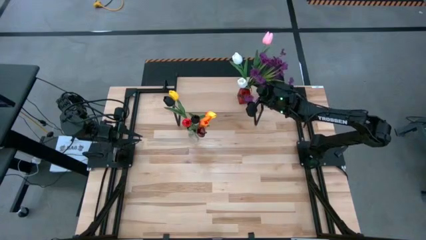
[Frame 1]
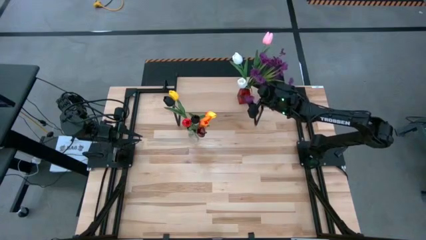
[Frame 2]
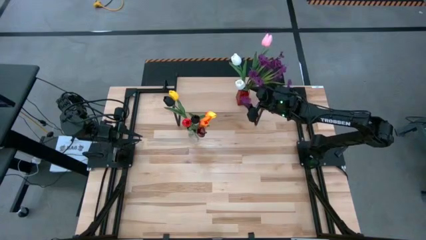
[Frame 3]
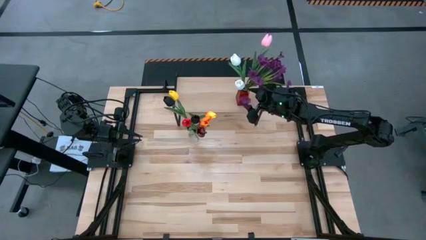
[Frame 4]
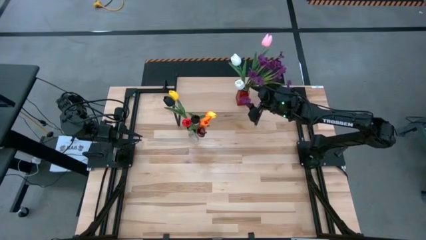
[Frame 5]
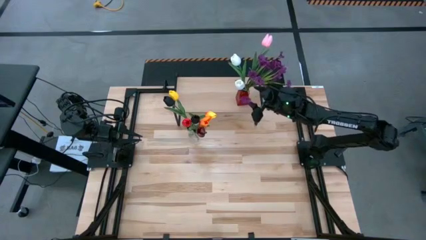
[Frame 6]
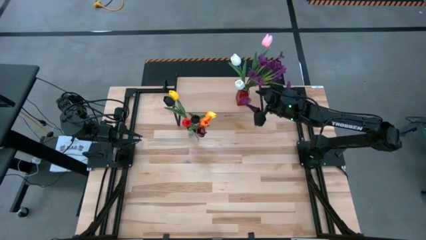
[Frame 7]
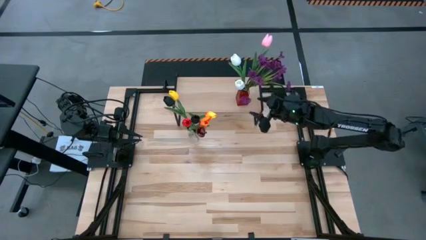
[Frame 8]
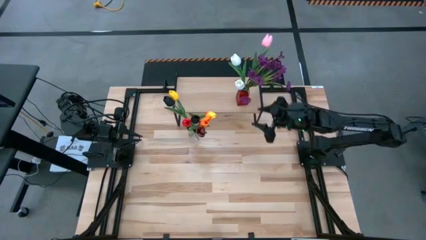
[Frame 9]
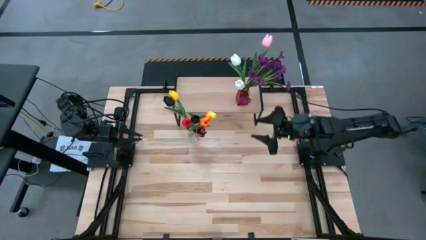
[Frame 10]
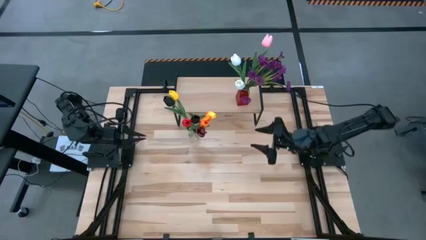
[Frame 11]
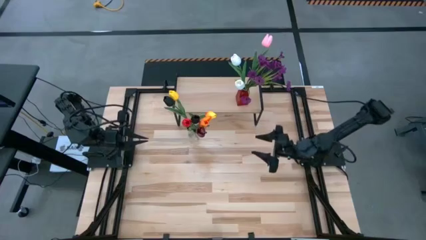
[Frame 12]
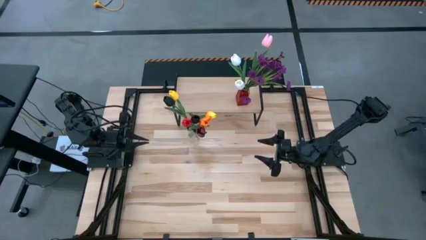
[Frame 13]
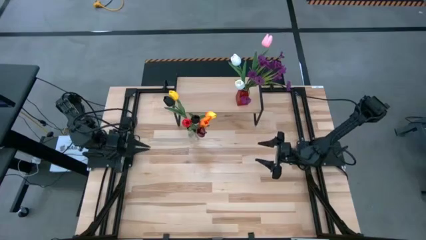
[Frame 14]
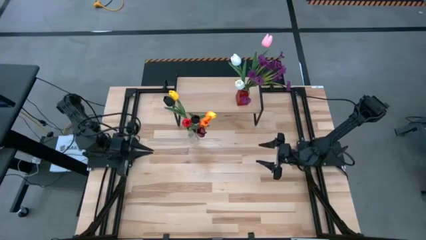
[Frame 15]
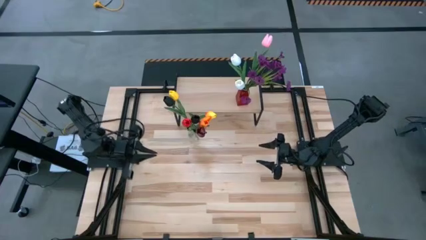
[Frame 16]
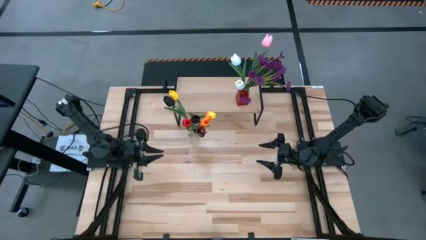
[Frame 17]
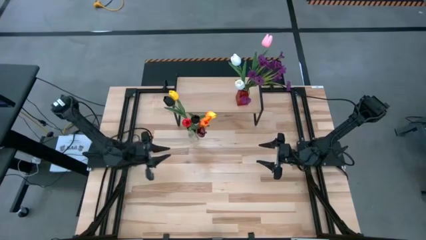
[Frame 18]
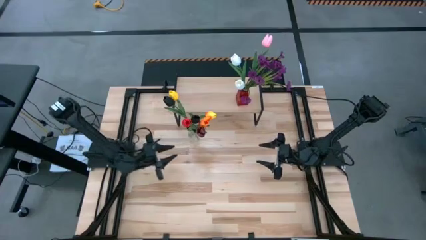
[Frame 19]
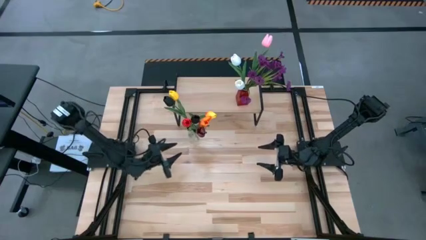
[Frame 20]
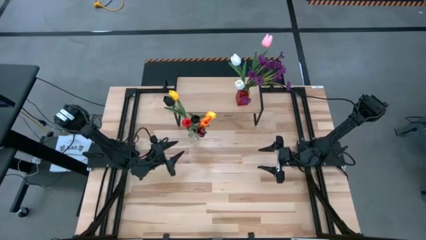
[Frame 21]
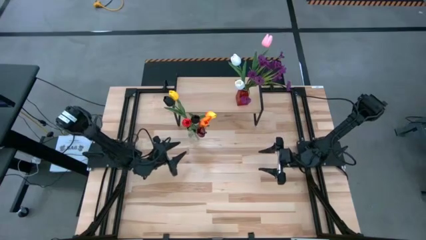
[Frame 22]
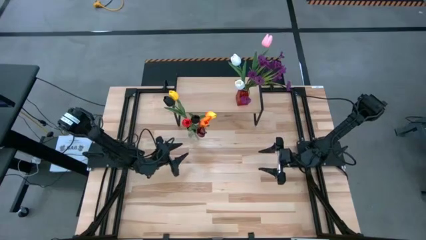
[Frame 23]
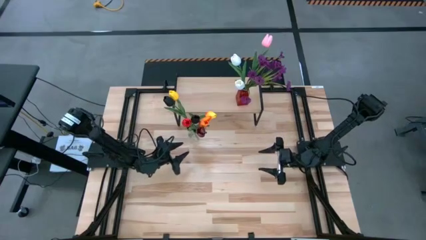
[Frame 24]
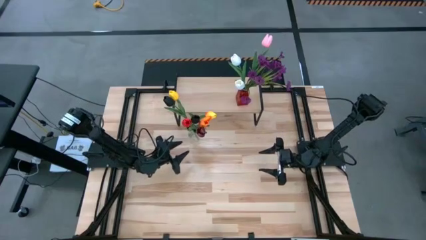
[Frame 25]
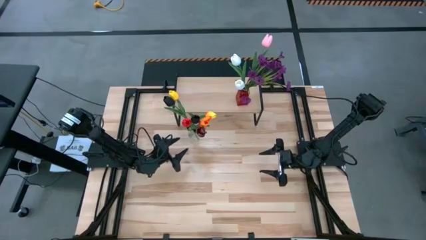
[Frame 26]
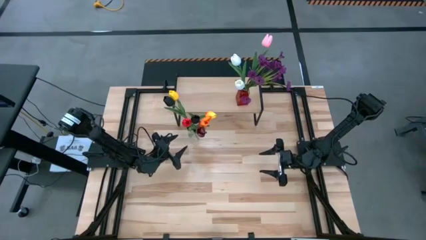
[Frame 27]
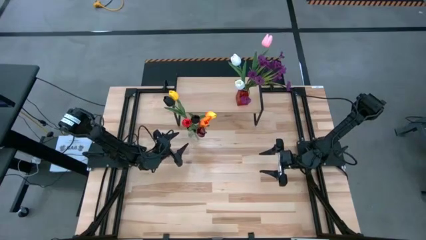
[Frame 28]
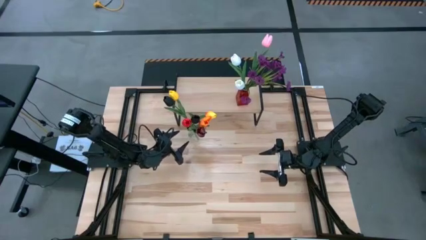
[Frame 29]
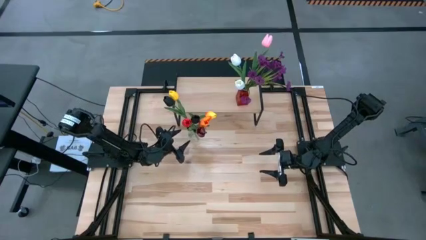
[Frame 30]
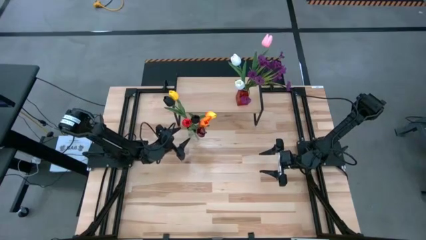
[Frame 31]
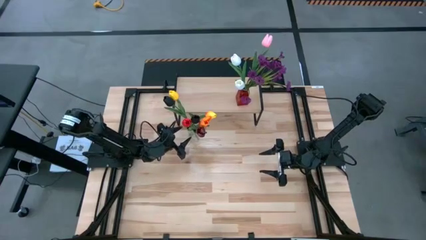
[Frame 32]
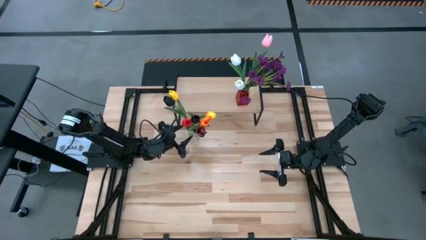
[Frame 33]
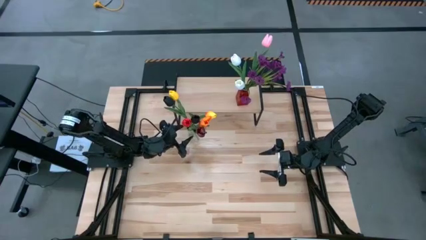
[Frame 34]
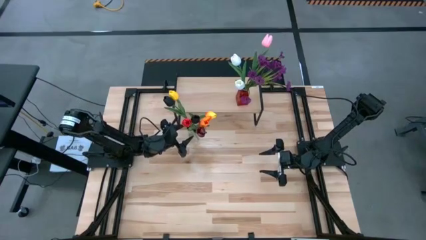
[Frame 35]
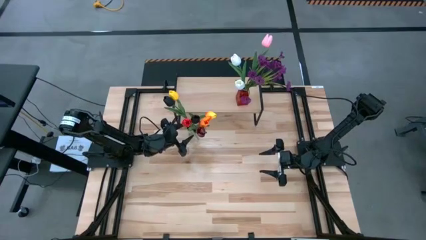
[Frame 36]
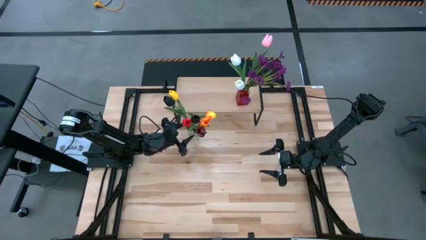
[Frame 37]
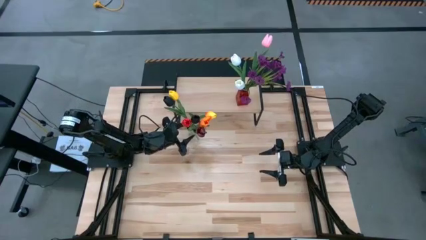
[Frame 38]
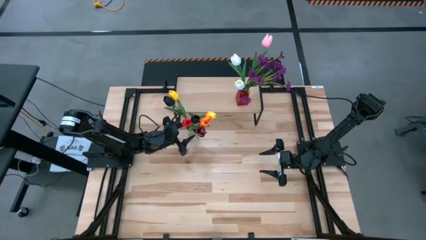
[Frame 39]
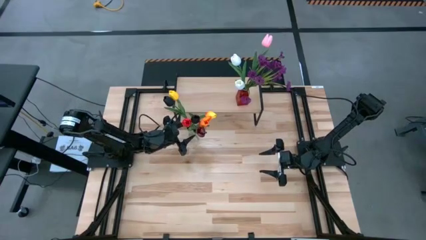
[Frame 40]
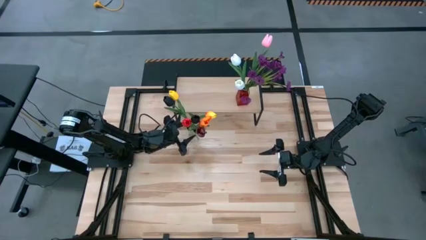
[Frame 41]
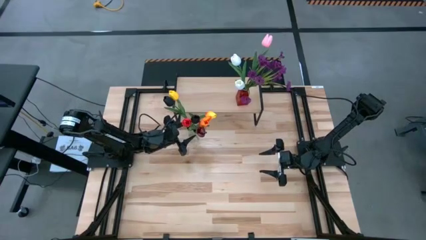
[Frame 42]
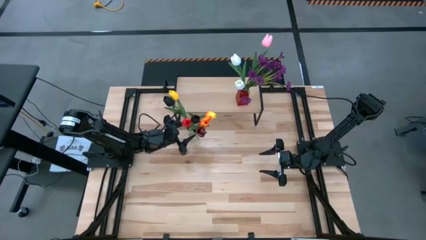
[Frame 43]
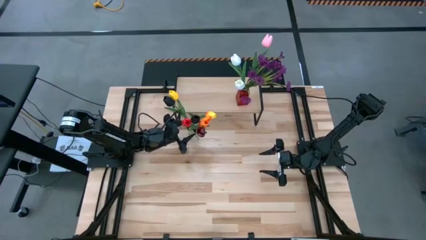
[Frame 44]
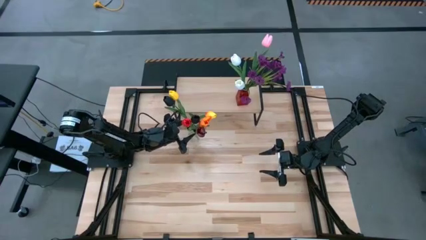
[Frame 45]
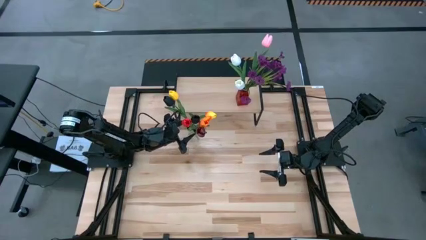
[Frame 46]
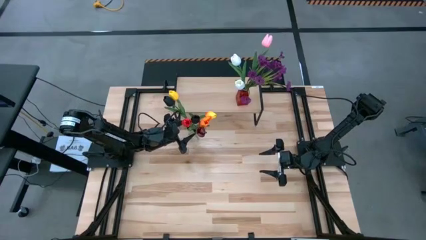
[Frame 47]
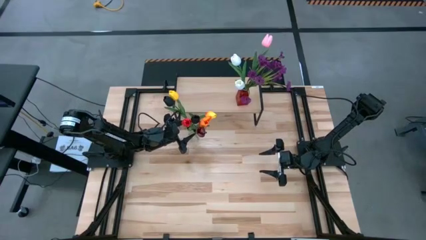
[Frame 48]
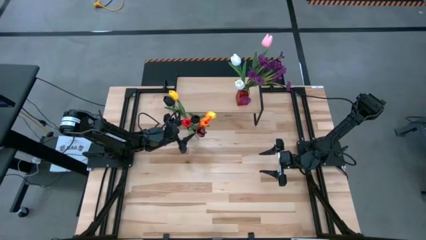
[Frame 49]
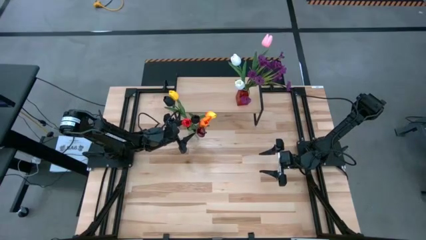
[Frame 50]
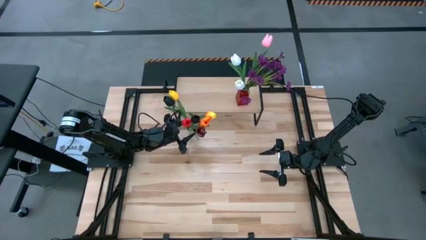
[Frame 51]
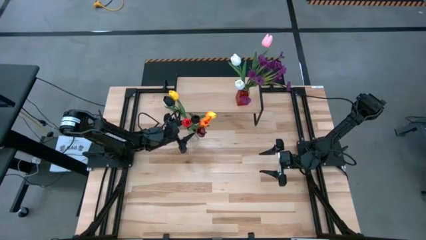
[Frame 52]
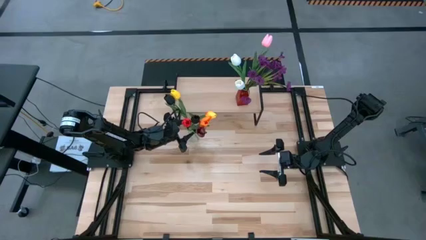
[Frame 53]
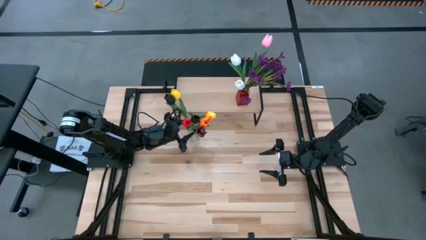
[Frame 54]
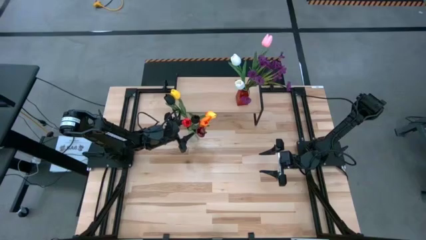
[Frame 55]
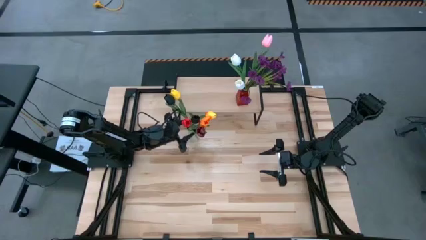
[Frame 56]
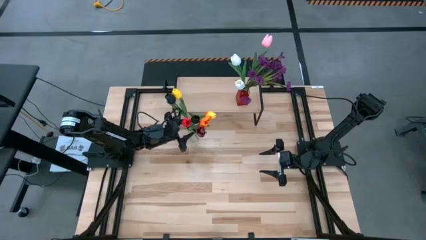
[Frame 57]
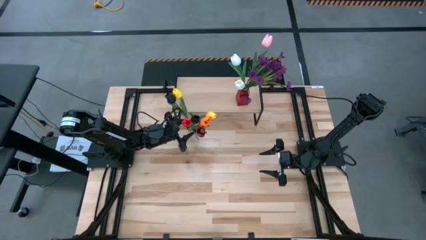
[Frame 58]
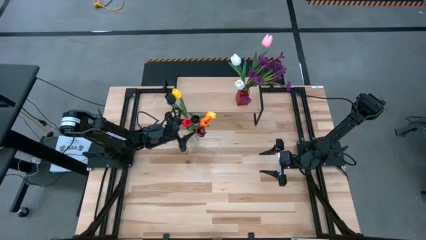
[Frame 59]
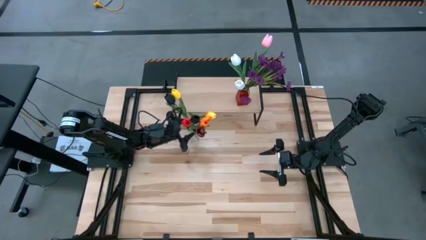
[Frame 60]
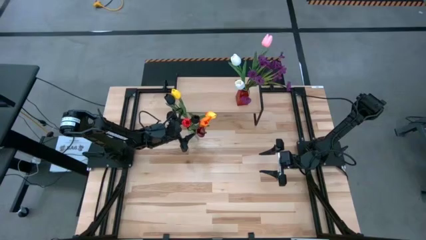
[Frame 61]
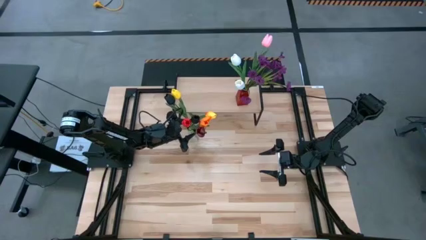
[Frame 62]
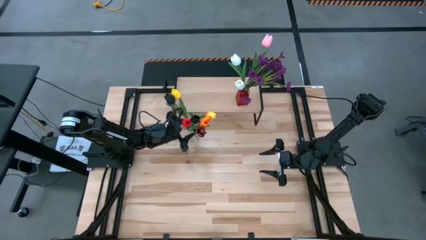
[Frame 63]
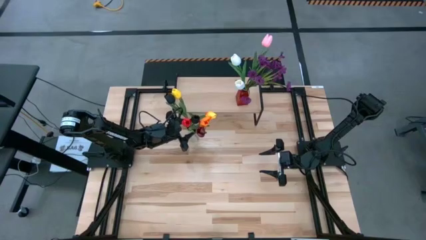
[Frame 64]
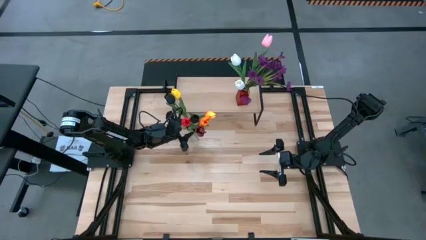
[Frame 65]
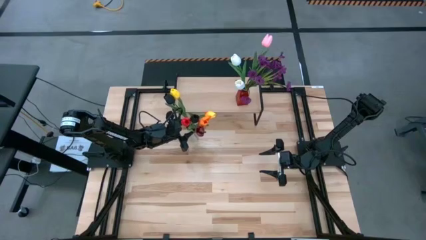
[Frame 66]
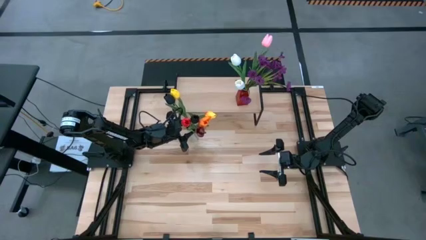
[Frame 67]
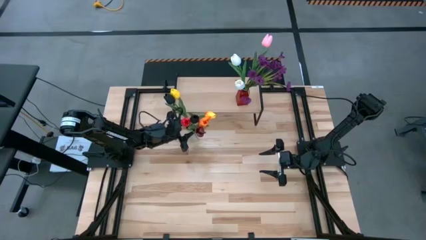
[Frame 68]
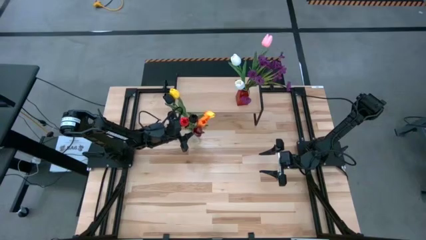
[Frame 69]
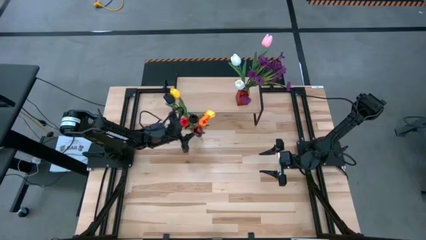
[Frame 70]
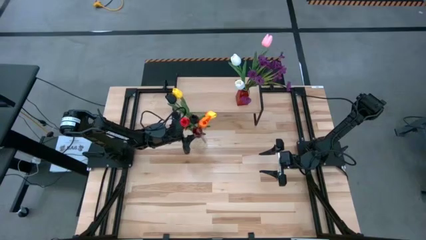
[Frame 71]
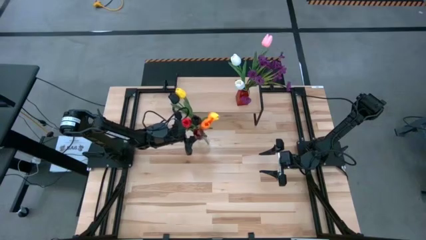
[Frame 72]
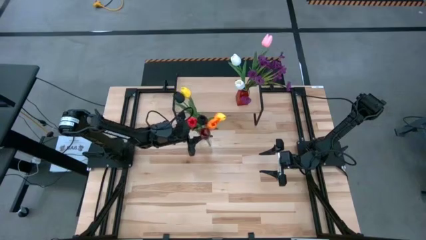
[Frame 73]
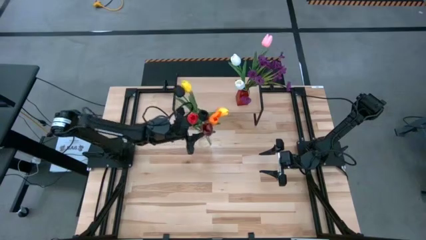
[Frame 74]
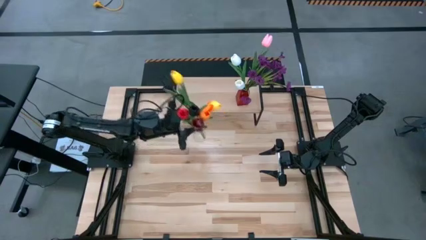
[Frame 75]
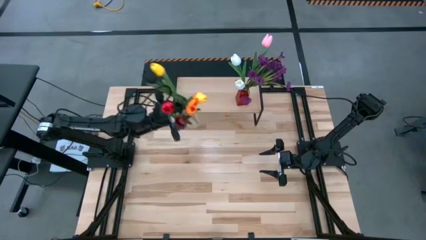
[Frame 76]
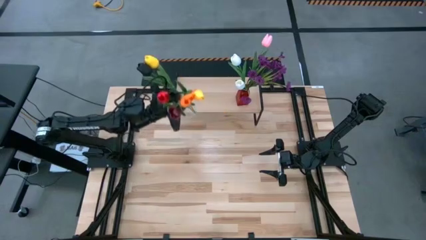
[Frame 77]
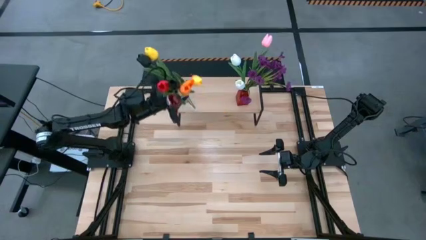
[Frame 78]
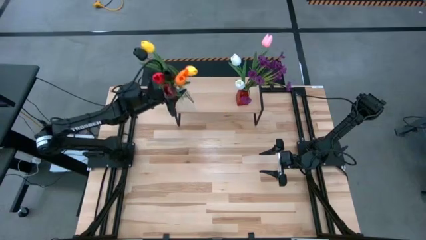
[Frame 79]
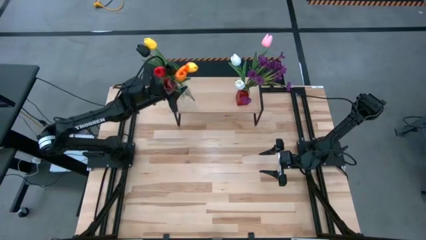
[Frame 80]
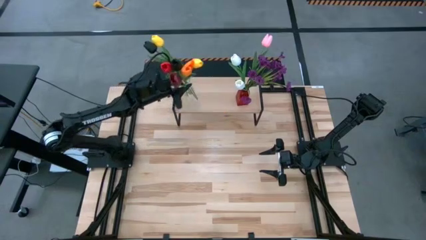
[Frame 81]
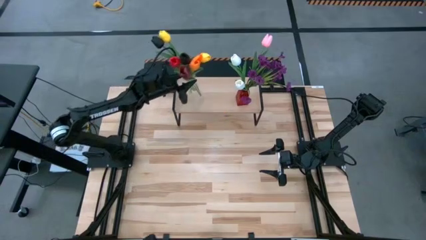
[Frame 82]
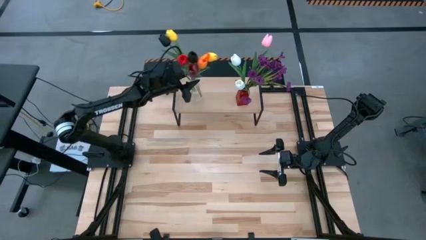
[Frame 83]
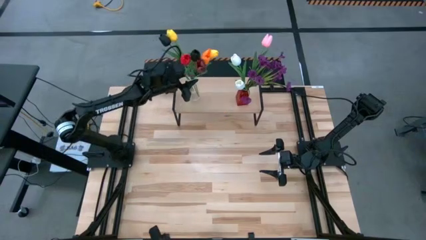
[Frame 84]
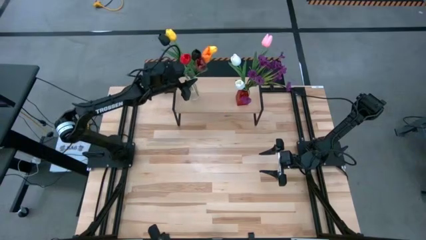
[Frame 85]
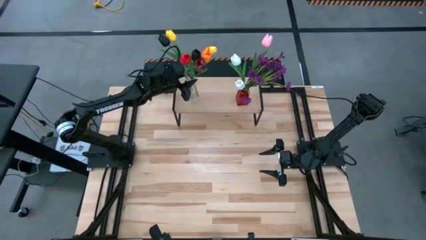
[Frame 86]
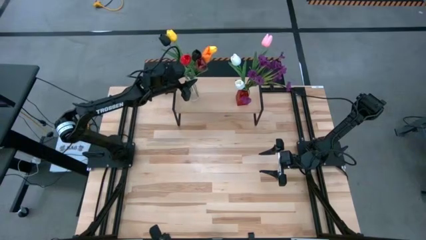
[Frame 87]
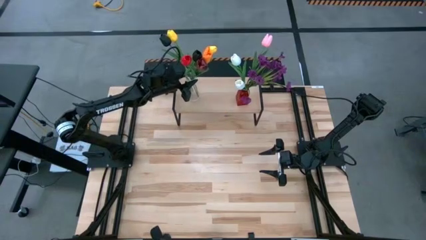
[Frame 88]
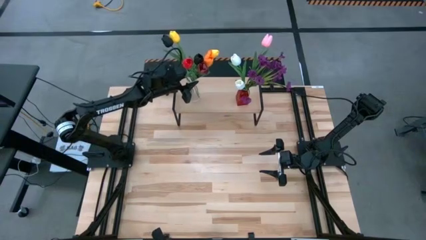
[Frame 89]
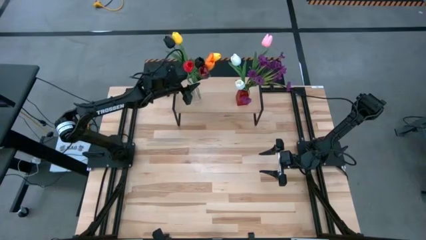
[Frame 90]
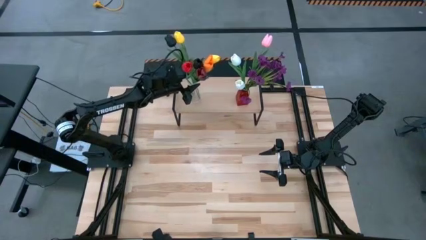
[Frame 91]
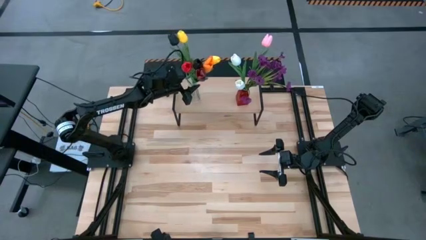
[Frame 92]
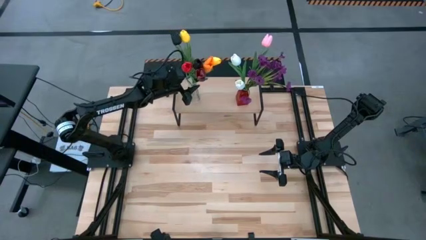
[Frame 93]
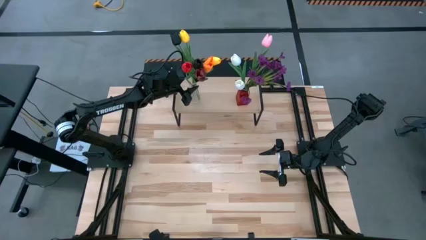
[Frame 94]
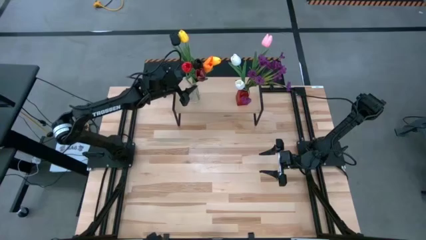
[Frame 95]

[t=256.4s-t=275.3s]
Task: Pick and place flowers into a vace then onto a shelf
Put the transparent vase with flowers on the shelf
